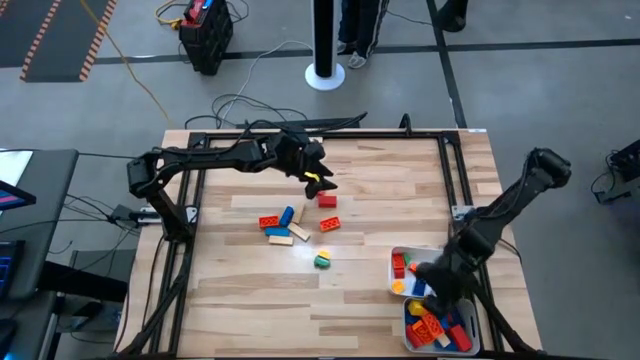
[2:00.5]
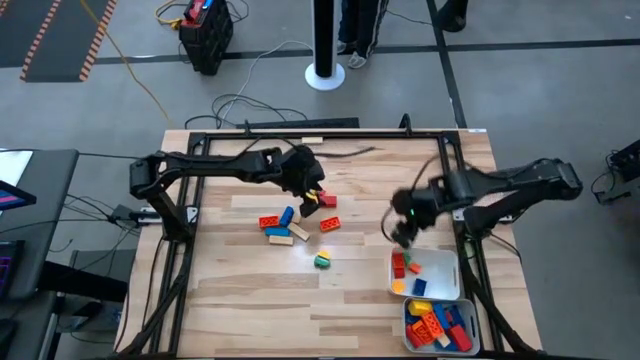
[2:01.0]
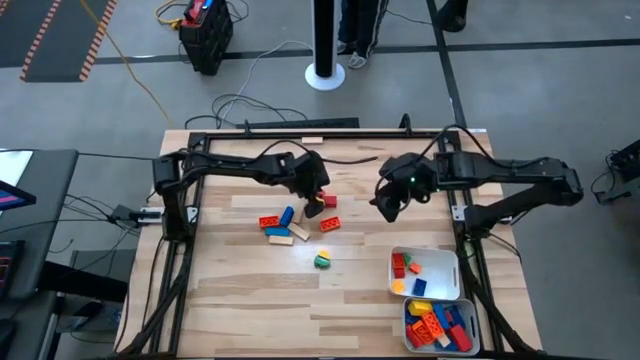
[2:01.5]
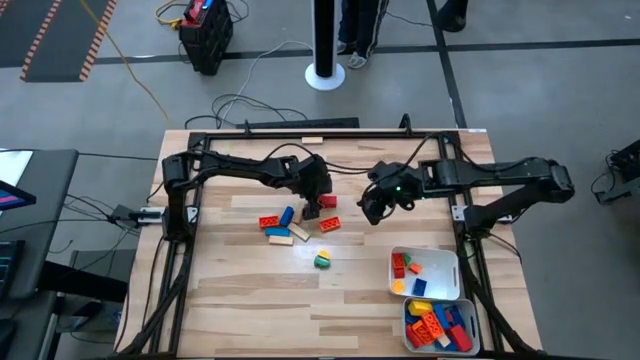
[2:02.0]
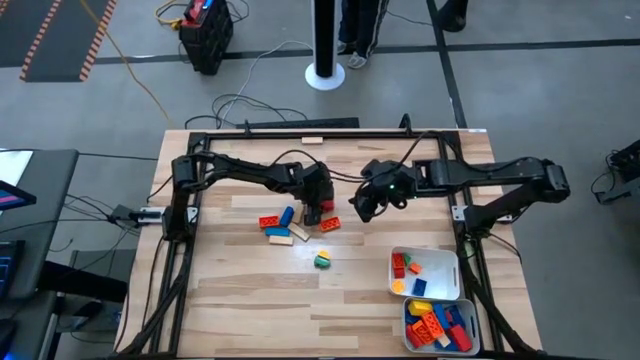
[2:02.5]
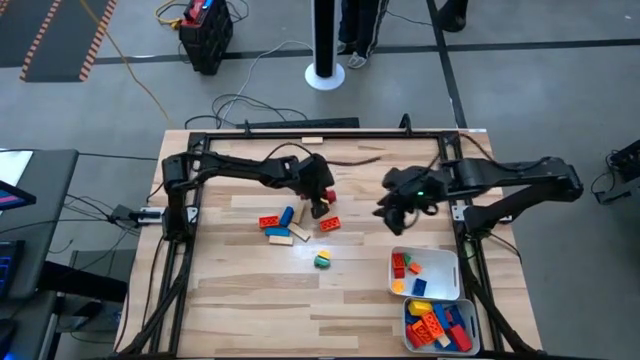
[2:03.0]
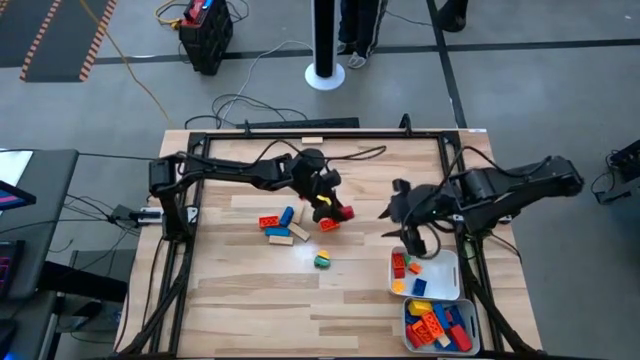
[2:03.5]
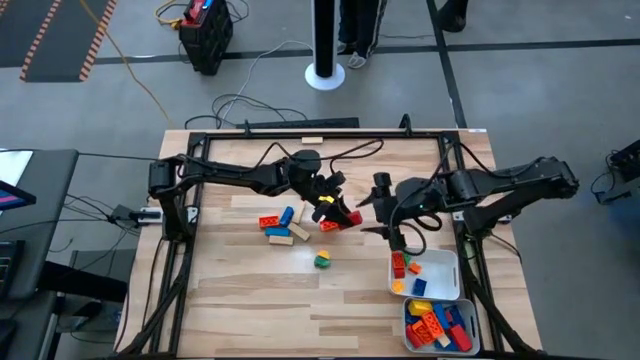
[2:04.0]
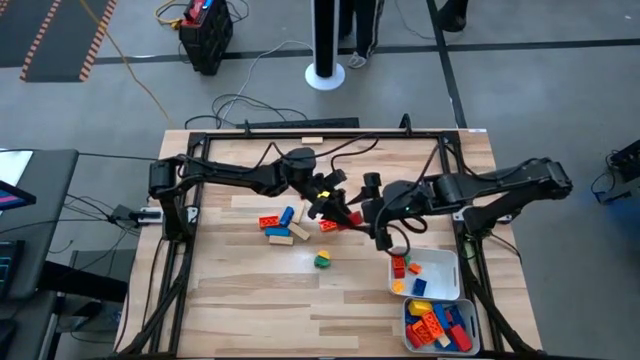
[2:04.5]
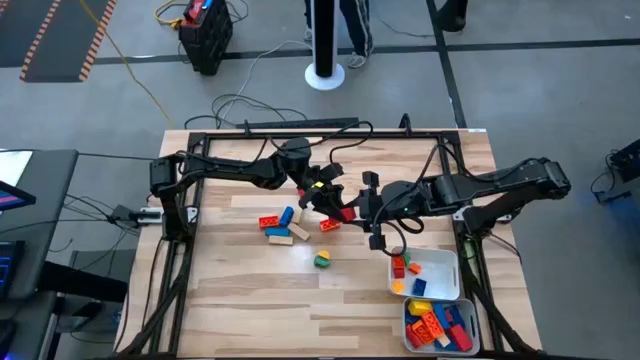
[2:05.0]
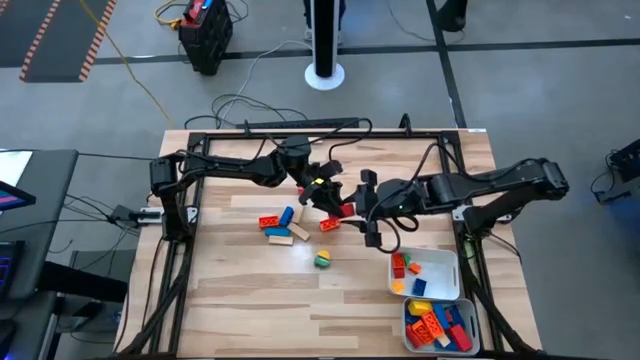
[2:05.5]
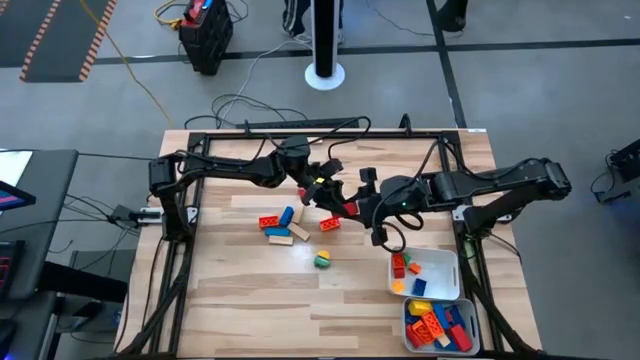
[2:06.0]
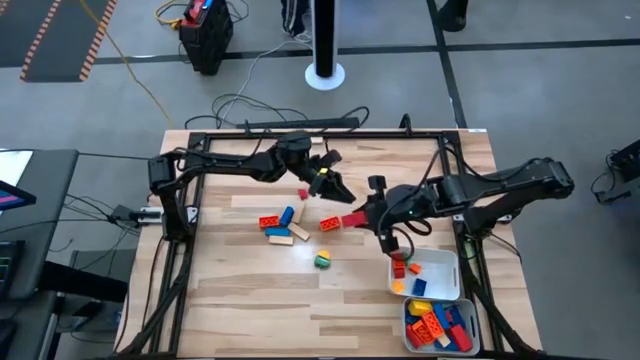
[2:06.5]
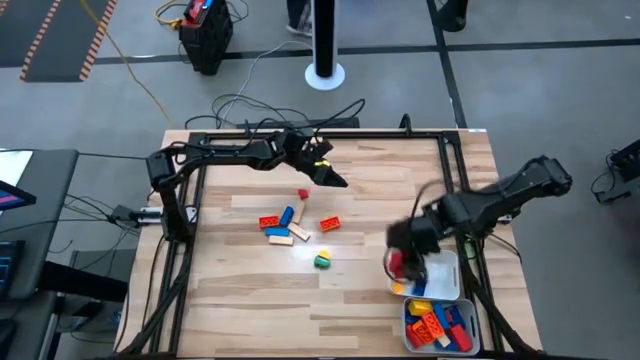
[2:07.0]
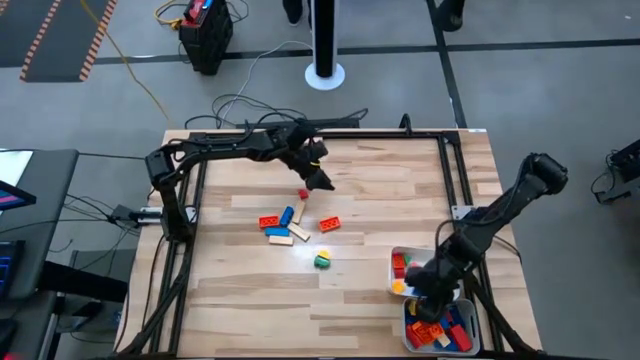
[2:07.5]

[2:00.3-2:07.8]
Task: Sort blocks by size
Put the big red block into the gray bin

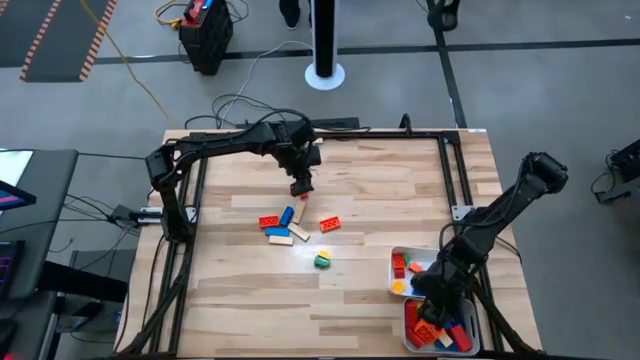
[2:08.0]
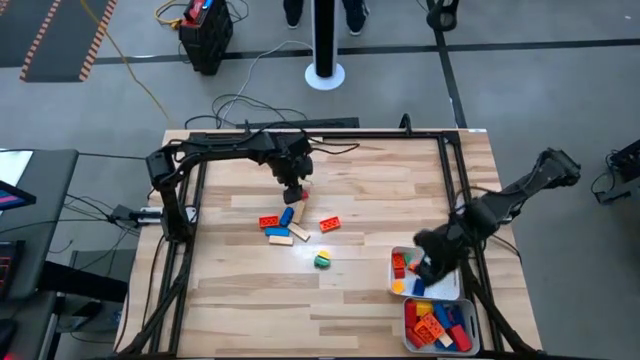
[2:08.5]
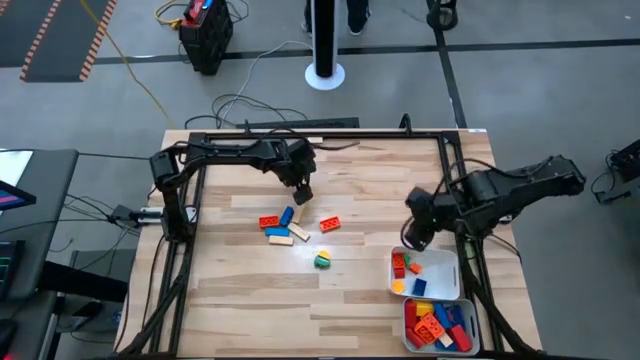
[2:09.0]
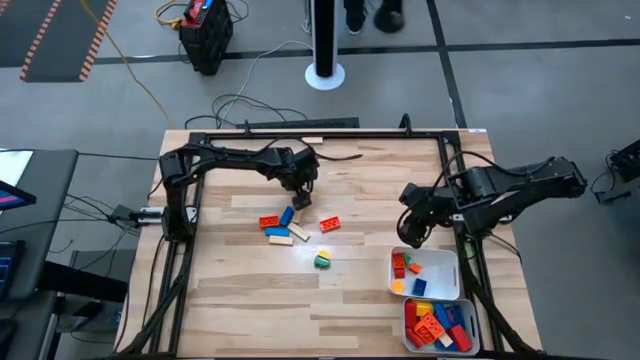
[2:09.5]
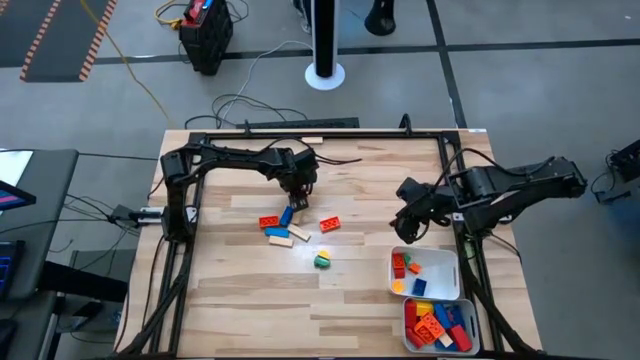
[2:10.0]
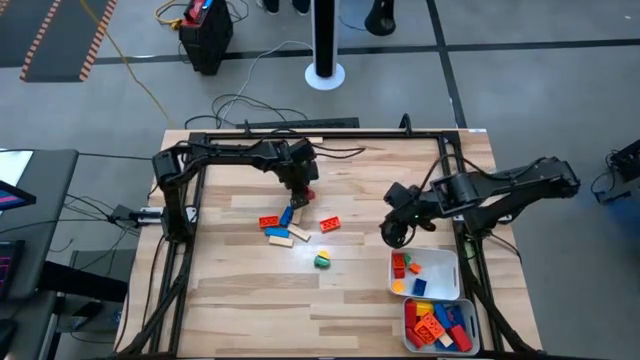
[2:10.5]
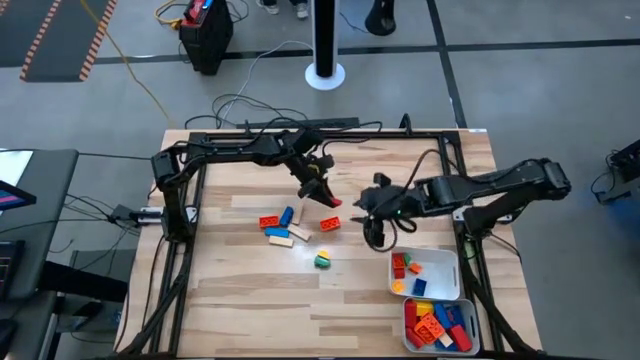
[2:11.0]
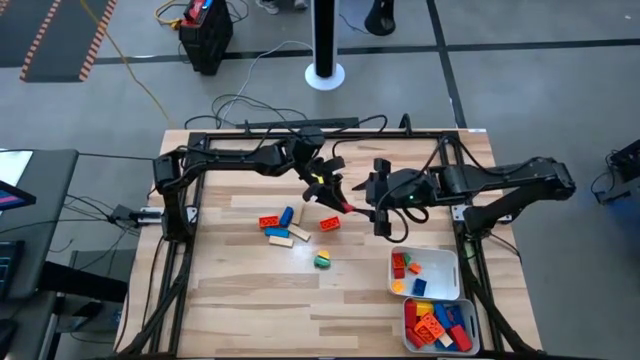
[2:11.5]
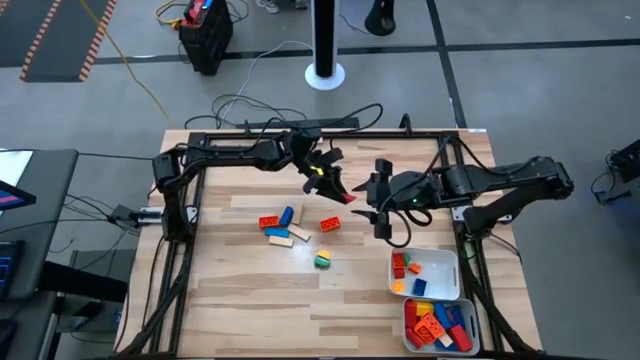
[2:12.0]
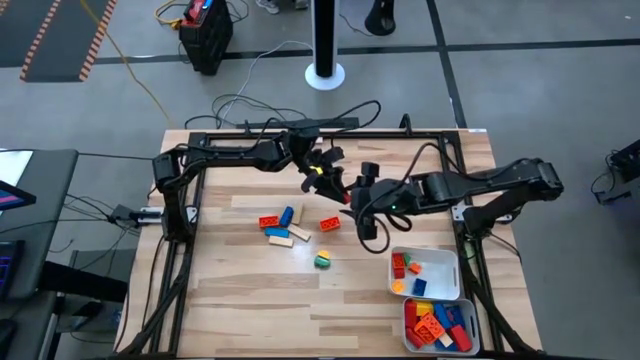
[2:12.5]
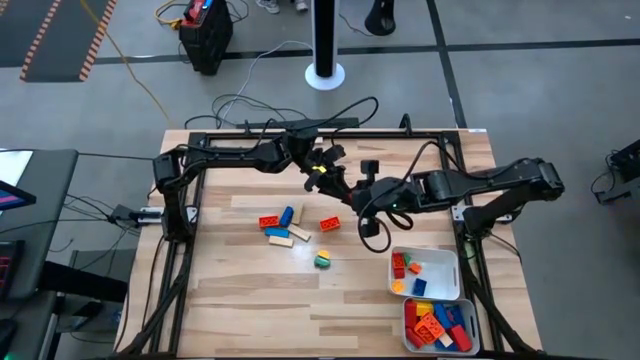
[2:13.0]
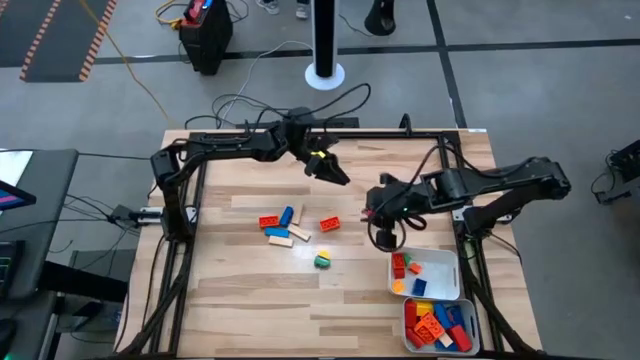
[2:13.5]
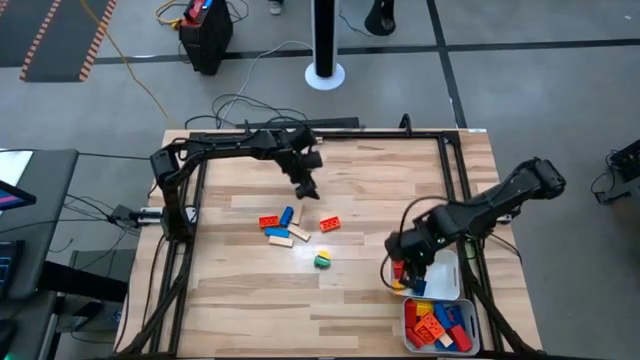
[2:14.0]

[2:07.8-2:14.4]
Put the small red block into the white bin

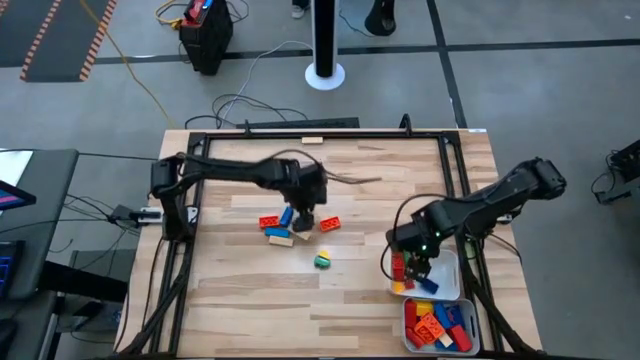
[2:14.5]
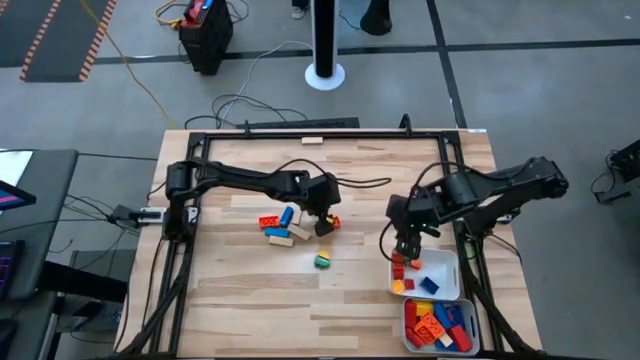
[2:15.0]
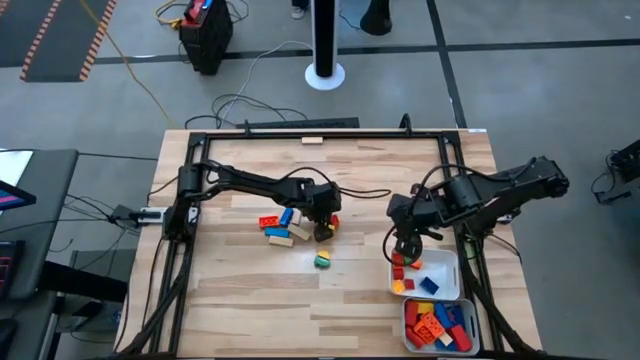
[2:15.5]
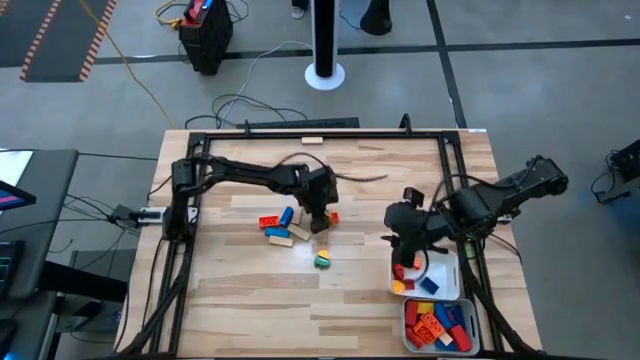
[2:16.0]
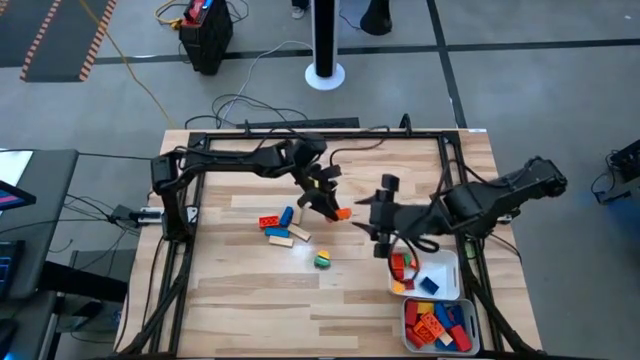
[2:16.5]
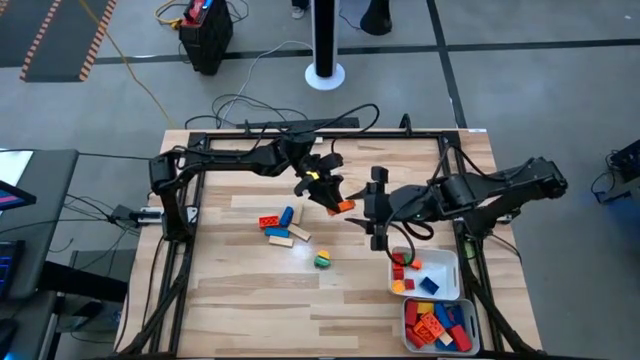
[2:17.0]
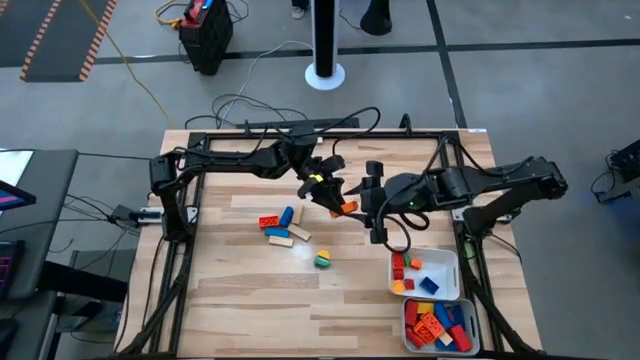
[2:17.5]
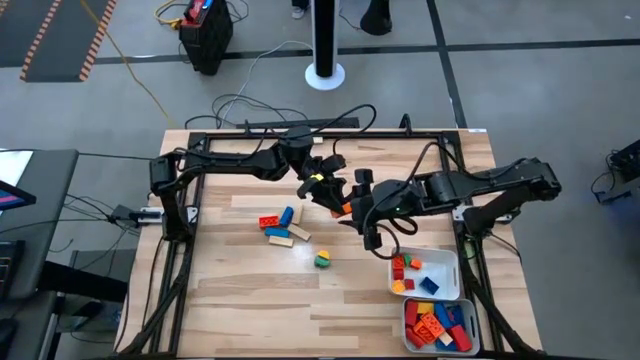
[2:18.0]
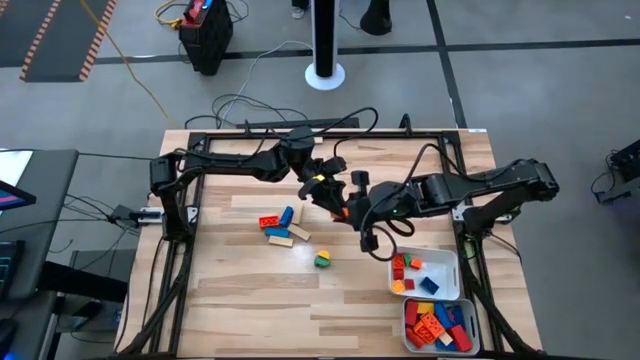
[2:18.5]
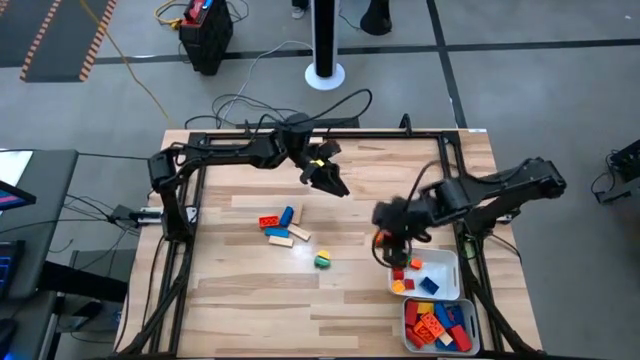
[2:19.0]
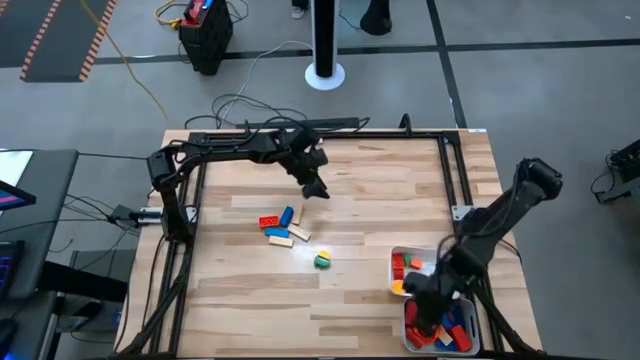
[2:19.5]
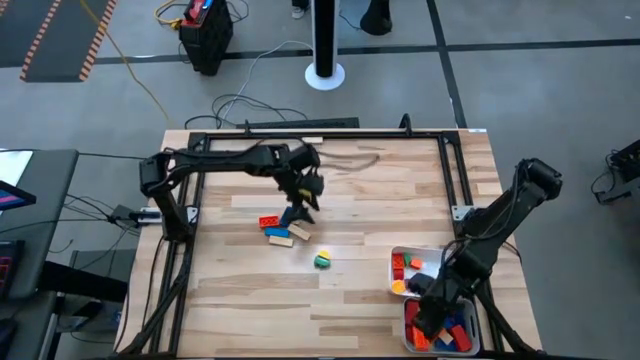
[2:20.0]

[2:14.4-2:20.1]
Put the big orange game piece into the gray bin

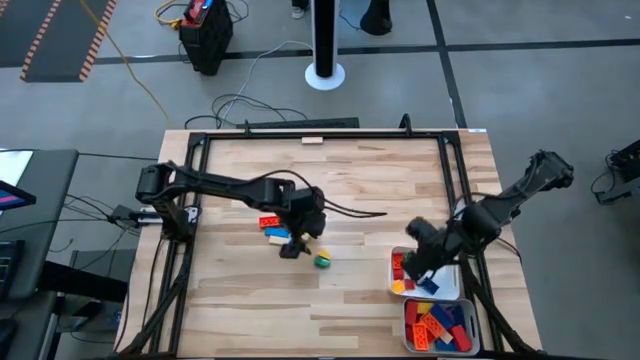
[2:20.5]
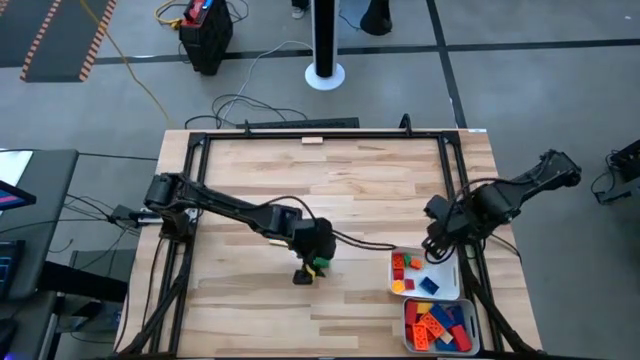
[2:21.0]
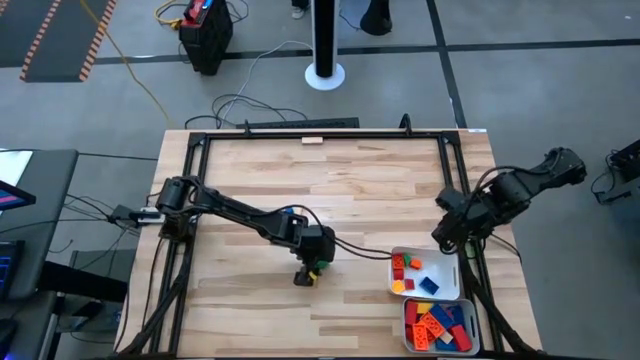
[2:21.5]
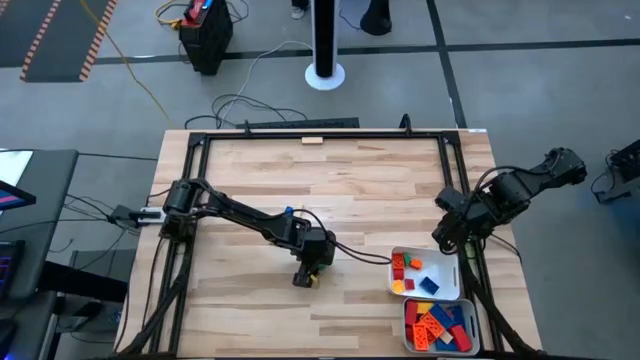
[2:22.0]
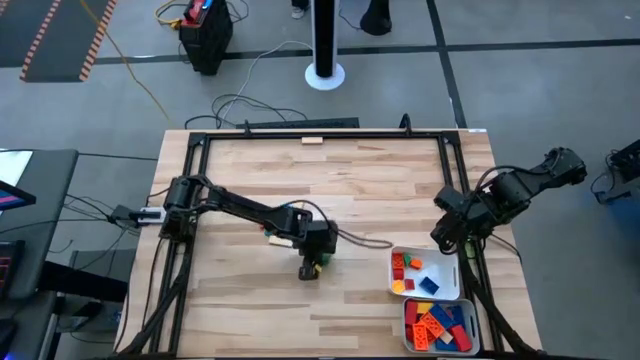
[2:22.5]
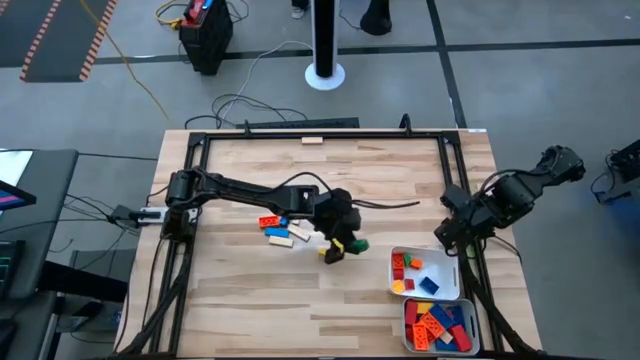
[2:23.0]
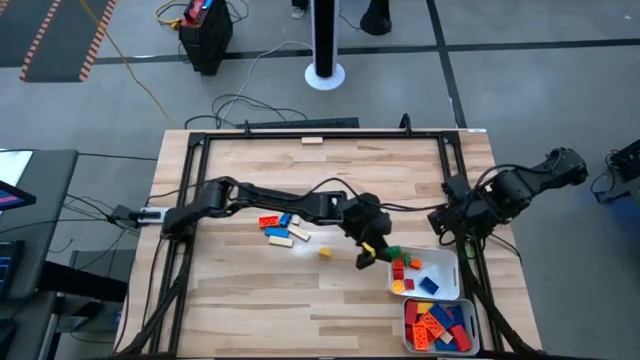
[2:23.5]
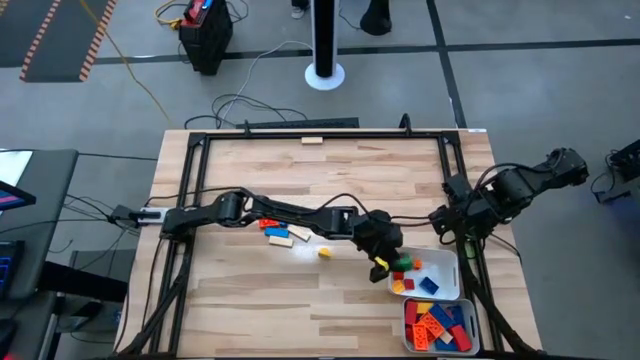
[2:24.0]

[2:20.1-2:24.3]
Put the small green game piece into the white bin
